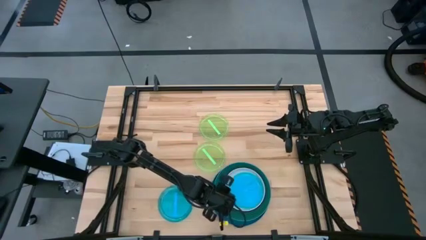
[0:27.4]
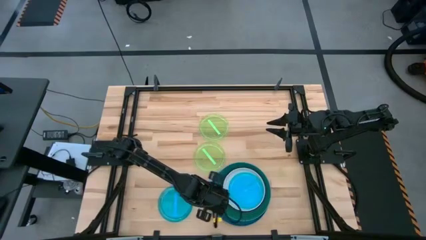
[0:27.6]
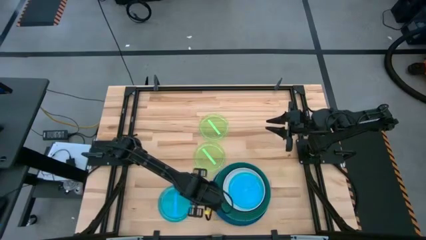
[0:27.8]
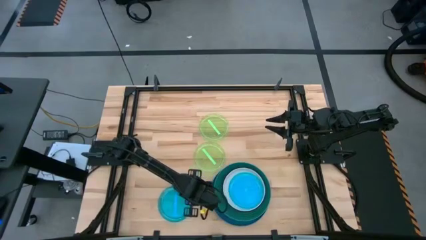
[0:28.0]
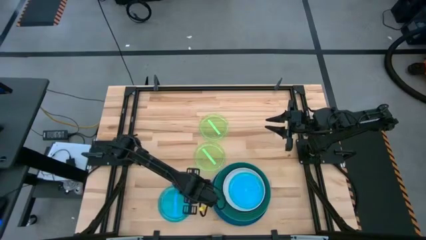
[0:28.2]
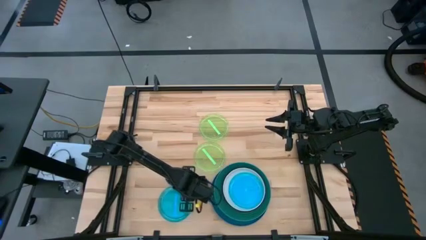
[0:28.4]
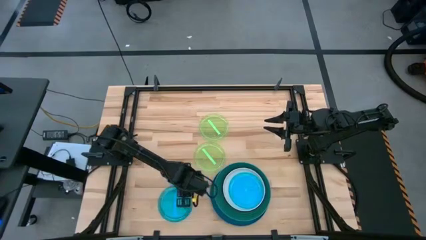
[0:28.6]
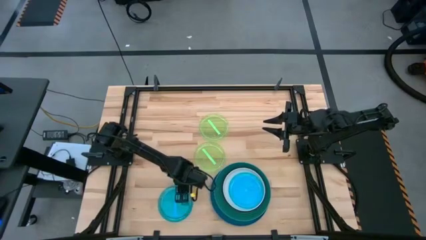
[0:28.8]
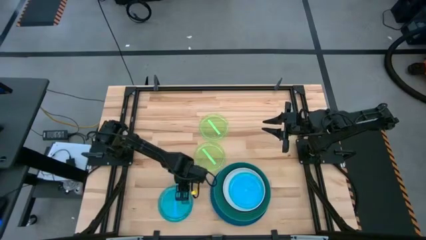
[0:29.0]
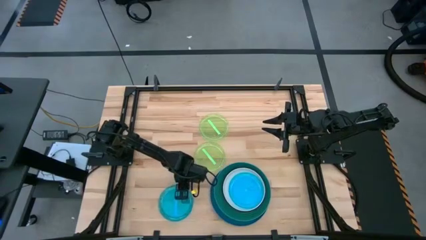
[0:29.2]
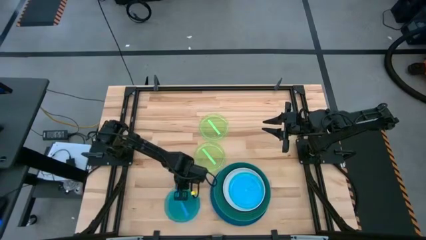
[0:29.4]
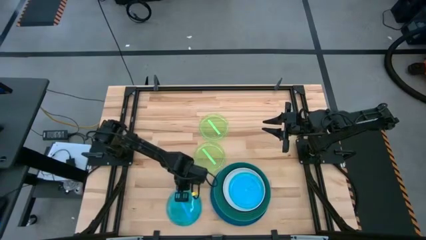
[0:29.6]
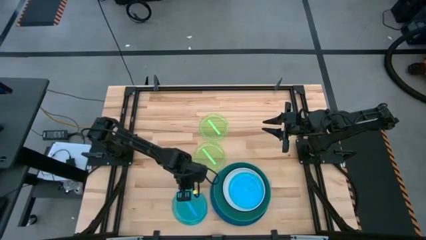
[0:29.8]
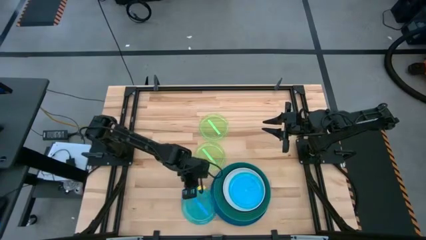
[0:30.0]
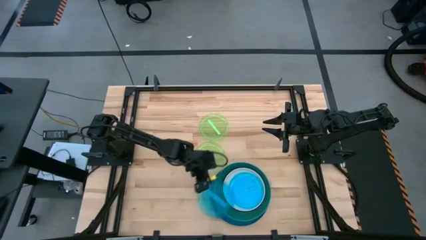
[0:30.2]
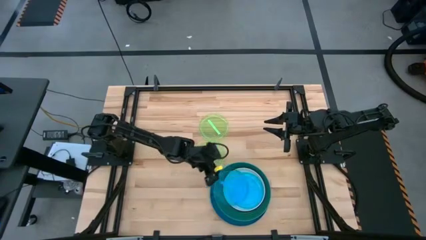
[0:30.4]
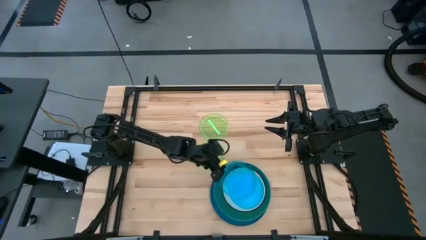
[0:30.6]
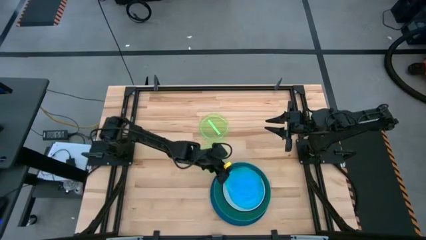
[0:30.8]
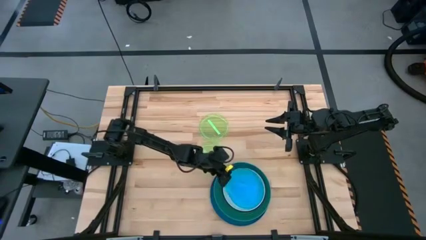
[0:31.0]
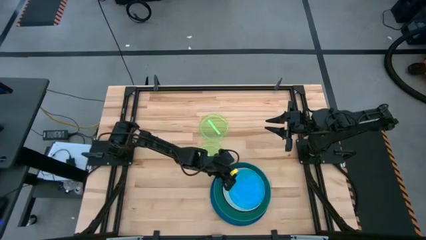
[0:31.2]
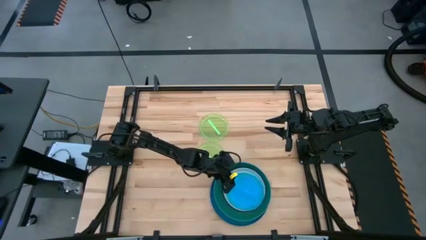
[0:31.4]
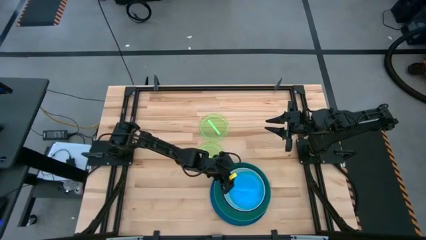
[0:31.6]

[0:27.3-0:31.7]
Task: Stack plastic plates
Stack the light blue plate on top of the light blue plate

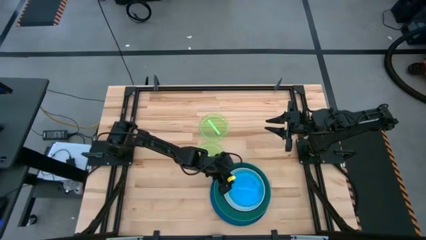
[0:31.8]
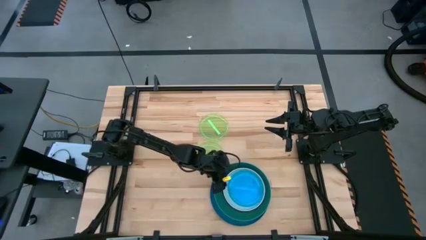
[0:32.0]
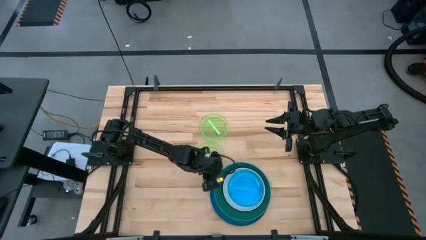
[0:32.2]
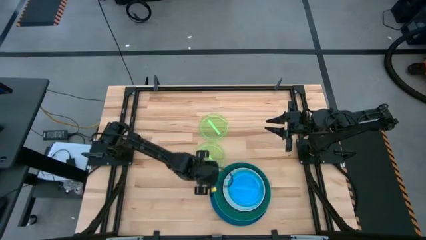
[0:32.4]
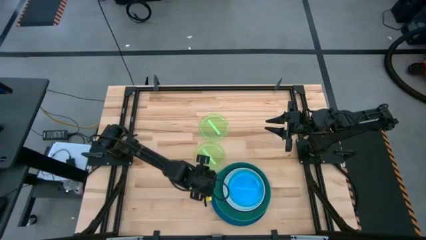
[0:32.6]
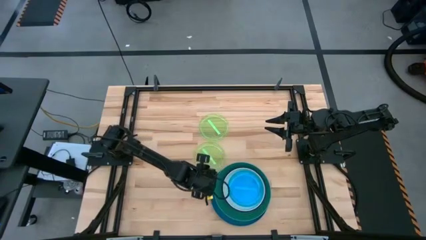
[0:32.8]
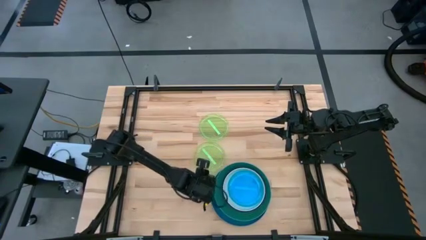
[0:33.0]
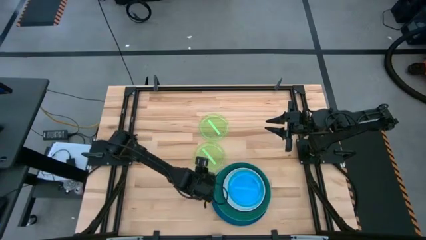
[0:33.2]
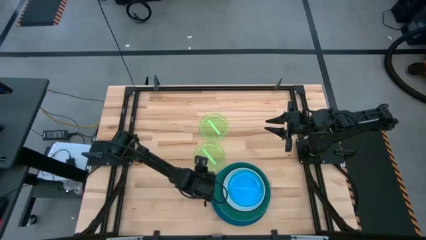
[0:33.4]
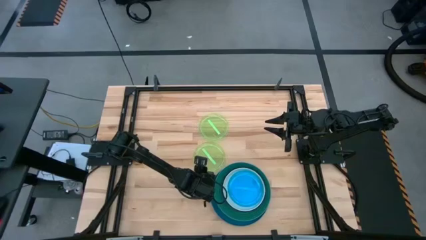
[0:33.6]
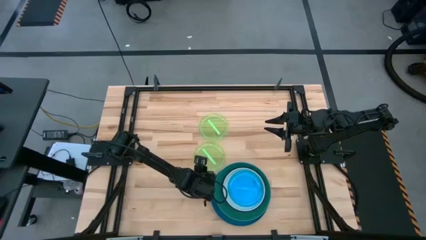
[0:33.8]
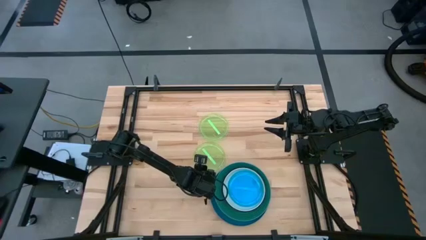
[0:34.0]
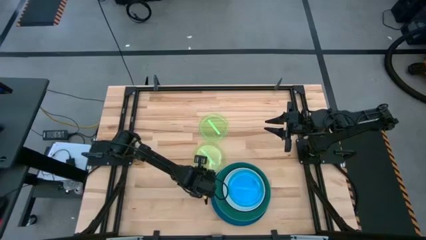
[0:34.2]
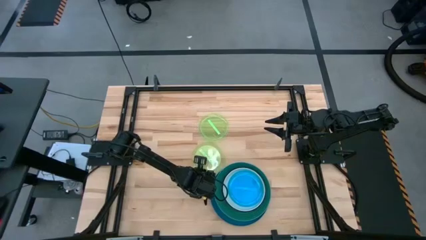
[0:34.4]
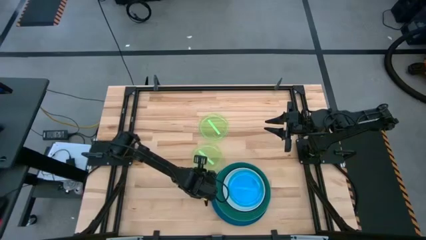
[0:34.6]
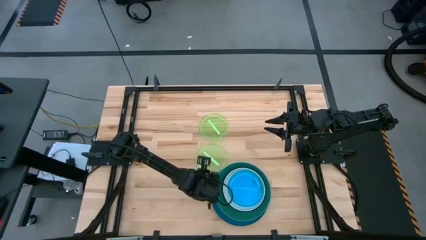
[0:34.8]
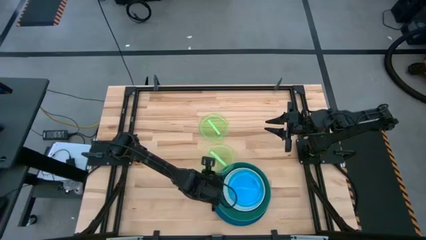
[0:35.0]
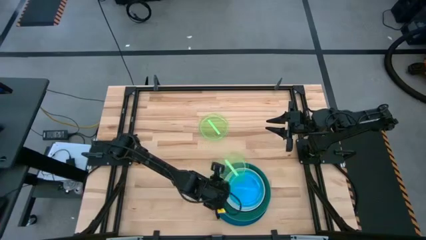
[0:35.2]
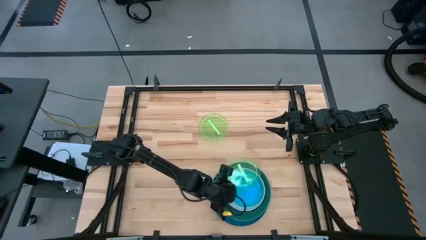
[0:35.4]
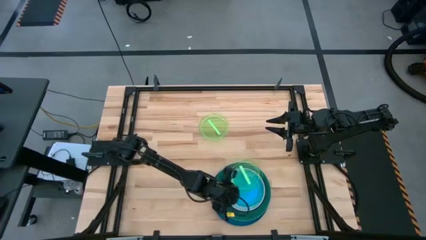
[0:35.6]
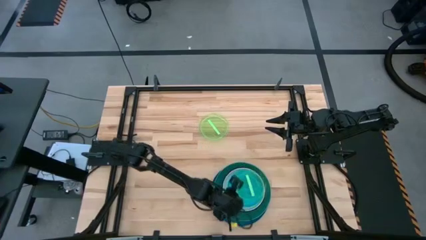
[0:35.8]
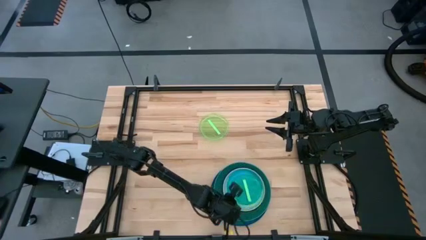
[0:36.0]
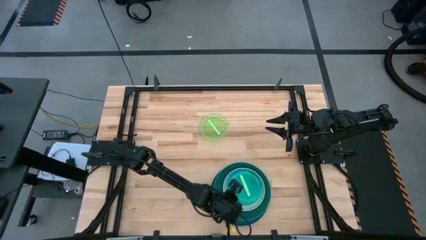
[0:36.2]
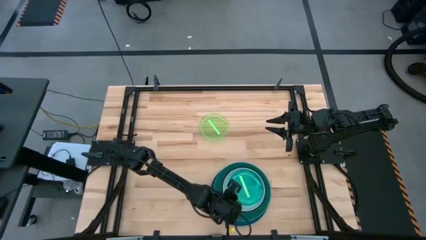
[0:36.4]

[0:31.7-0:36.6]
Stack the bottom light green plate on top of the light blue plate

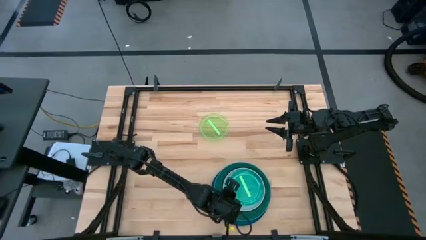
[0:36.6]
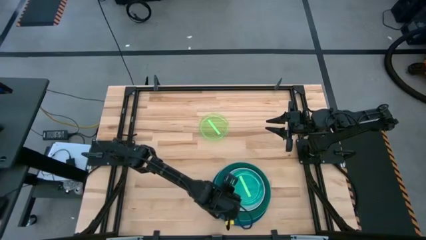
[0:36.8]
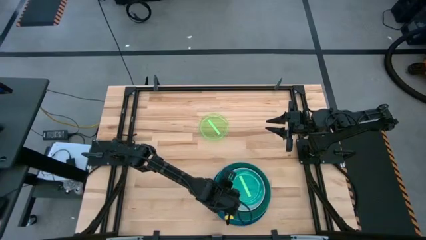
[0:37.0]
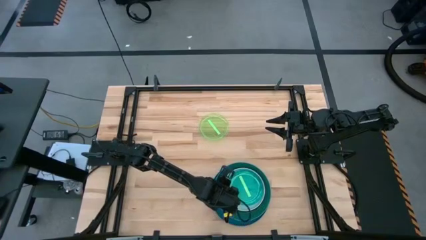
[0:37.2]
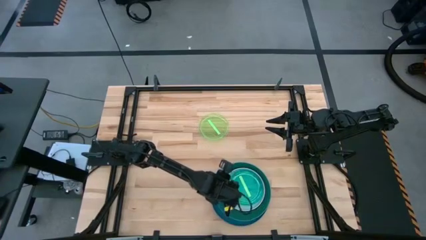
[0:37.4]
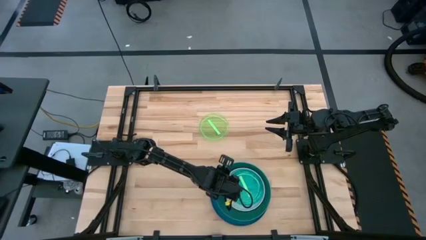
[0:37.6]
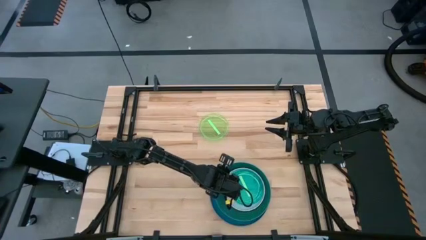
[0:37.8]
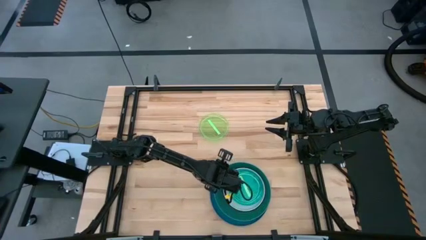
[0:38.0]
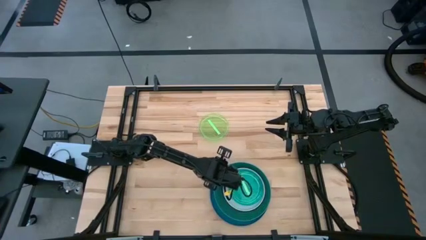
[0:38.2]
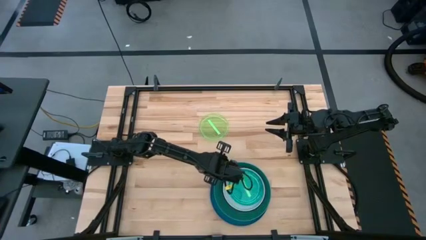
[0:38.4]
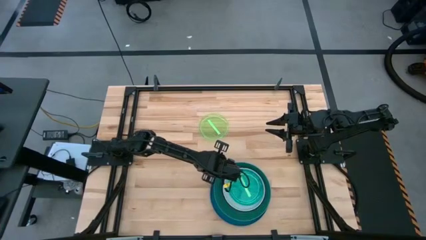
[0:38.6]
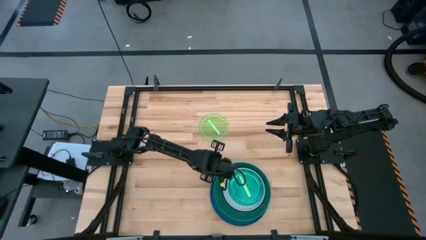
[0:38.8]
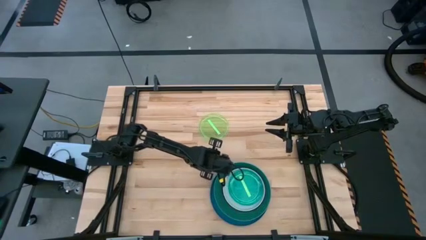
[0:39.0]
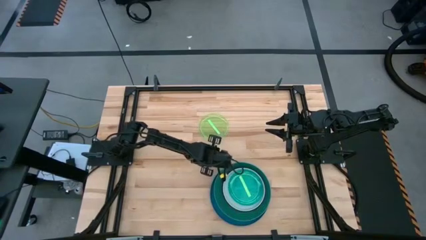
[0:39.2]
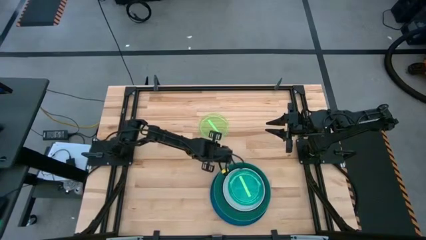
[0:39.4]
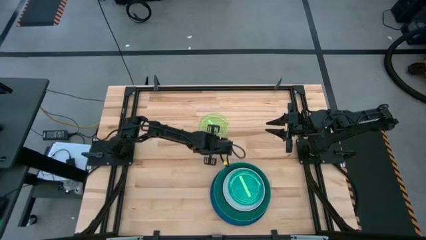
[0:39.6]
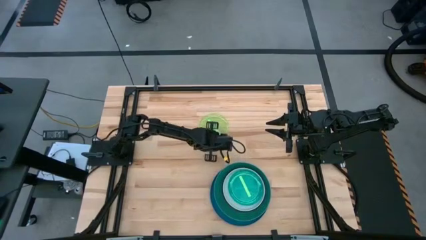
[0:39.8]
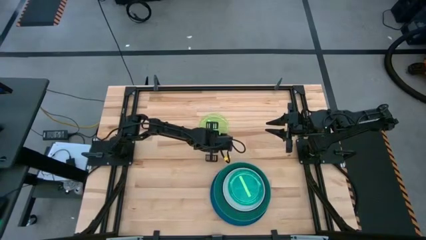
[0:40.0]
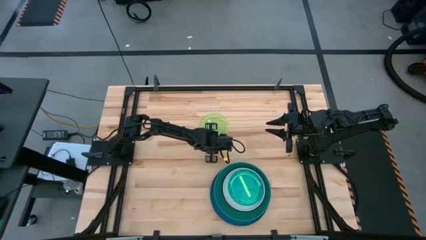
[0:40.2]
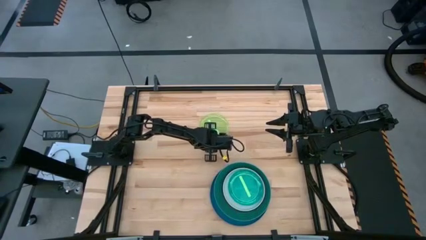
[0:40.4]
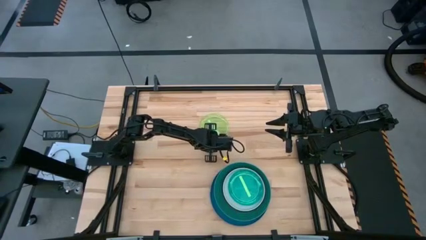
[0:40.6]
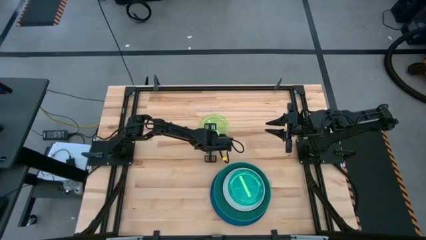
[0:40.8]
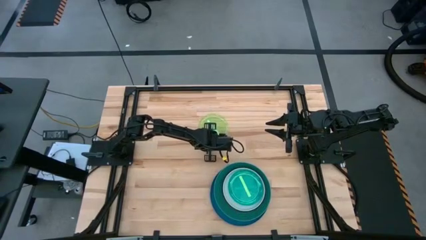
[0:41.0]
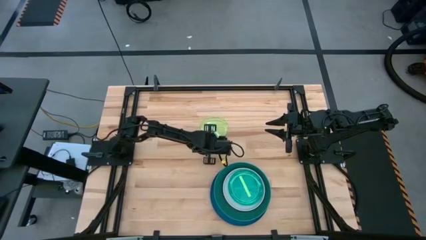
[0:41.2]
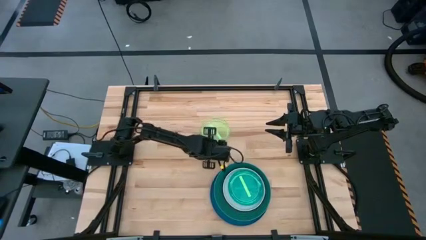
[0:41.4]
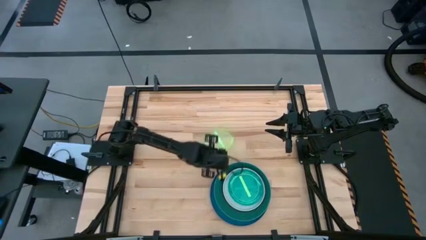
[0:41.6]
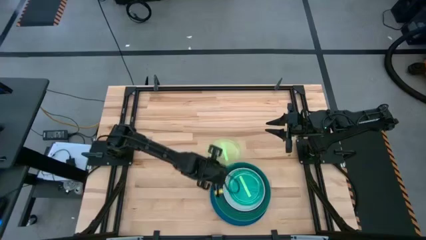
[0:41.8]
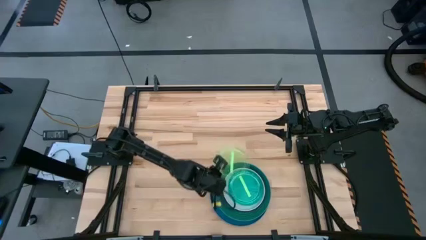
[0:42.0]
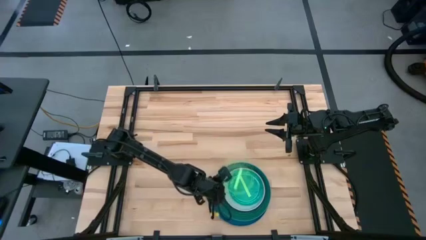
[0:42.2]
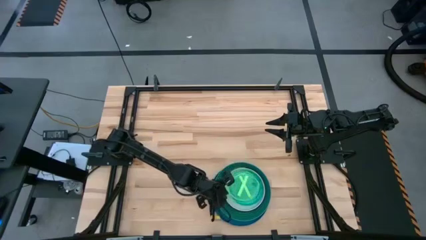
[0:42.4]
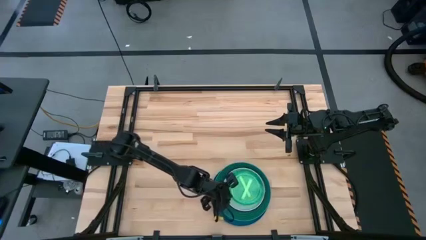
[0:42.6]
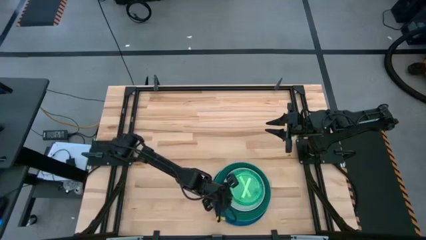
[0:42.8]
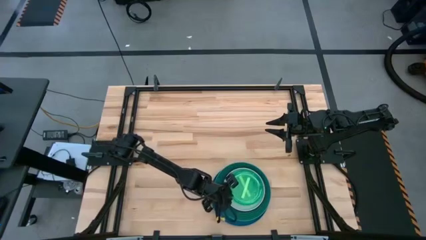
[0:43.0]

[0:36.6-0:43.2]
Stack the light green plate on top of the light green plate

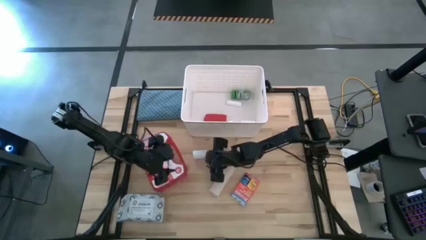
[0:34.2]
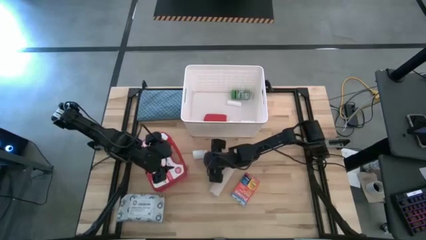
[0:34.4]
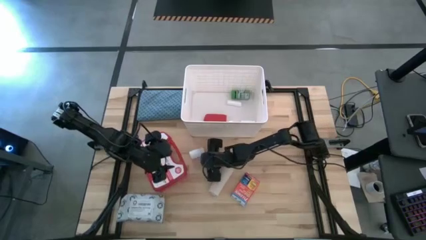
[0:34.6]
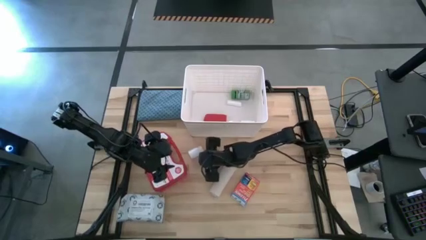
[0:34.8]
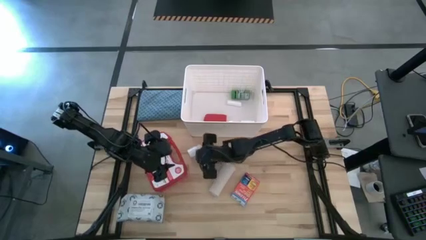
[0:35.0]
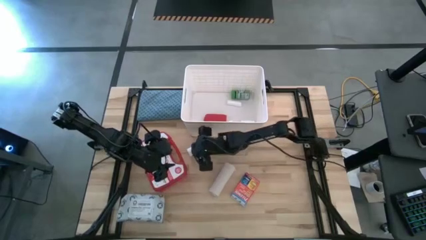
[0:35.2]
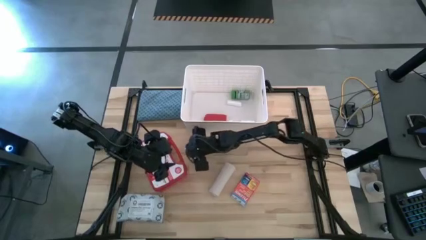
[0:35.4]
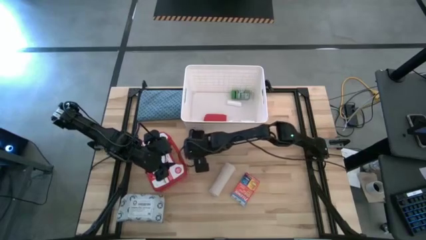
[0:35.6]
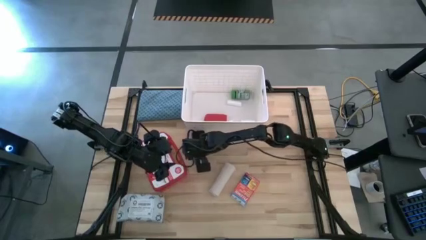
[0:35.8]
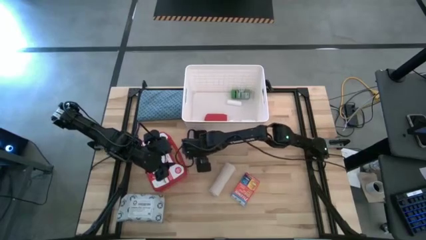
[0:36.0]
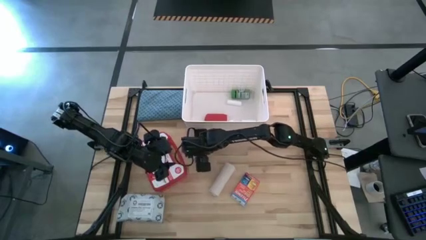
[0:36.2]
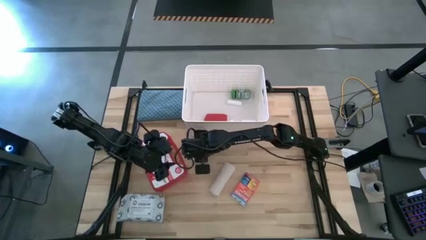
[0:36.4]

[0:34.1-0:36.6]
Task: Pick & place medical supplies in basket/bin
Put the white pill bottle in the white bin
